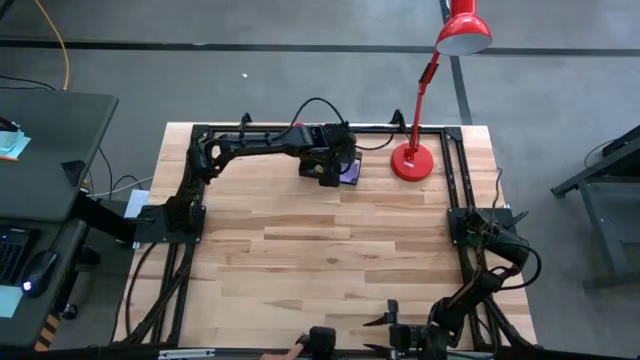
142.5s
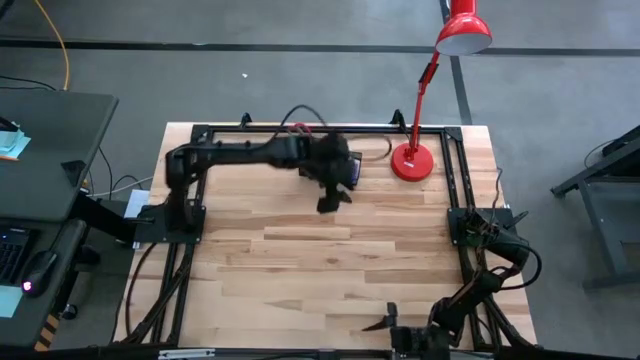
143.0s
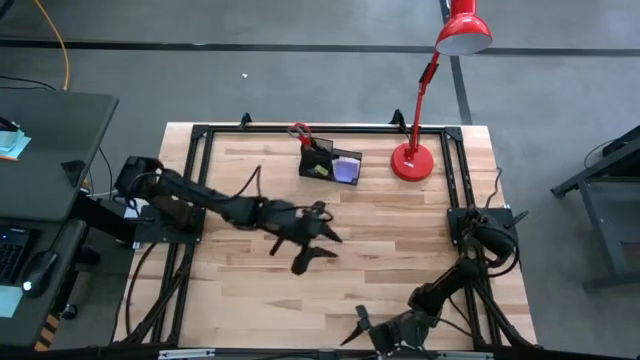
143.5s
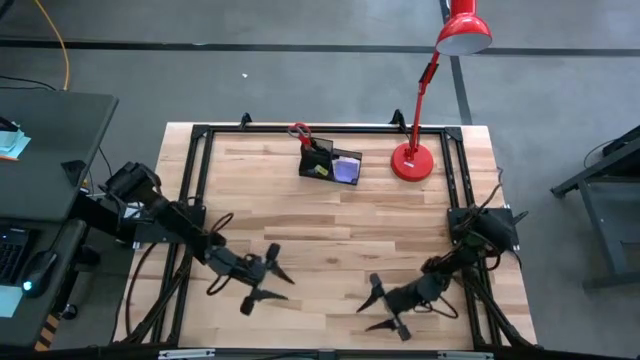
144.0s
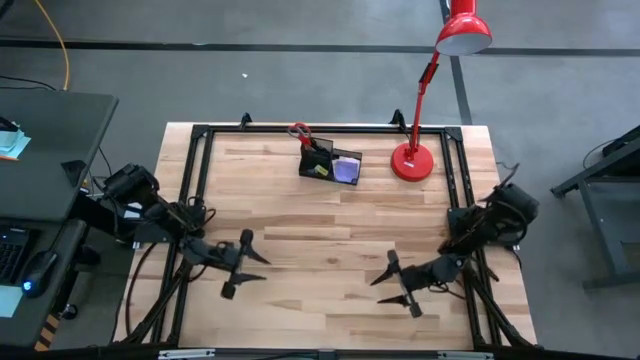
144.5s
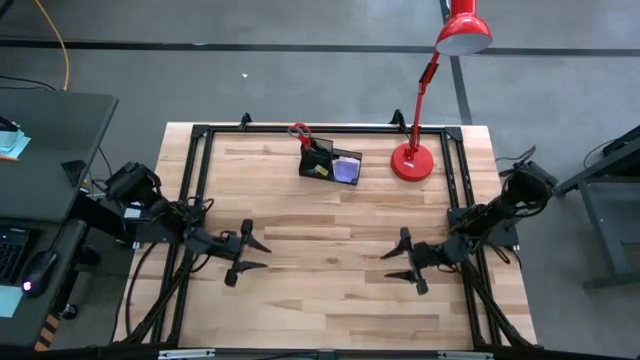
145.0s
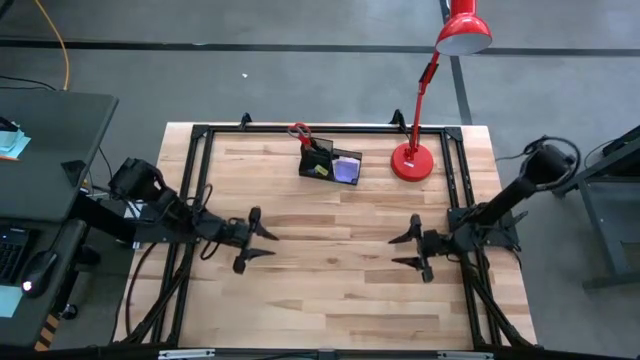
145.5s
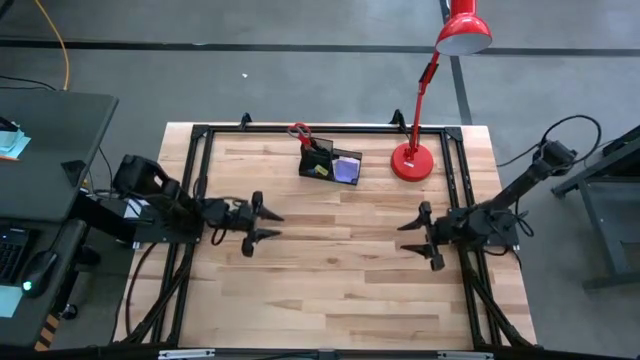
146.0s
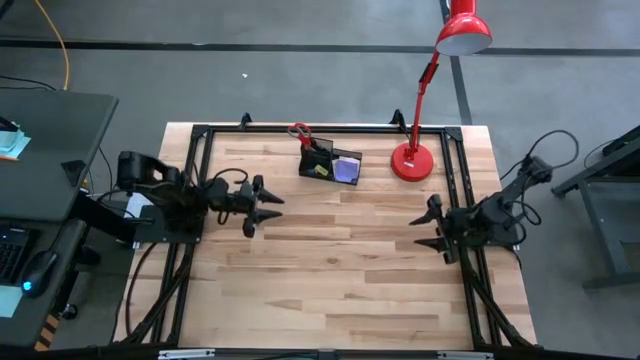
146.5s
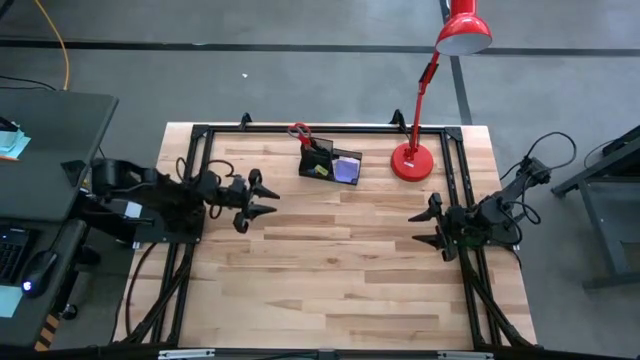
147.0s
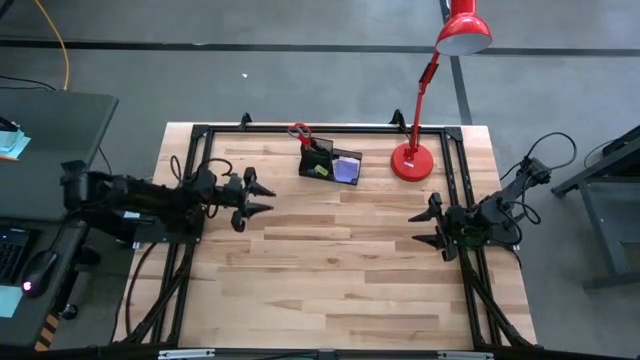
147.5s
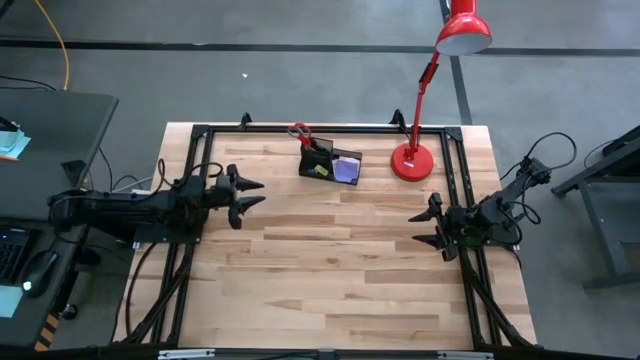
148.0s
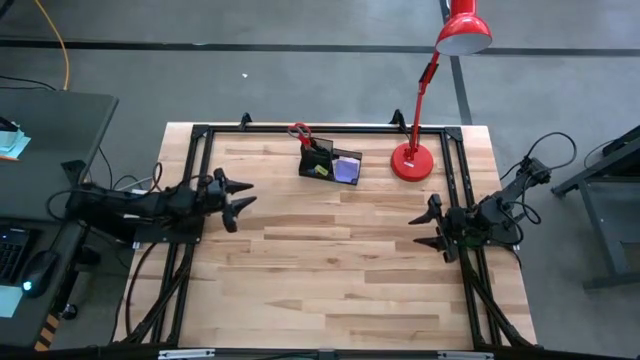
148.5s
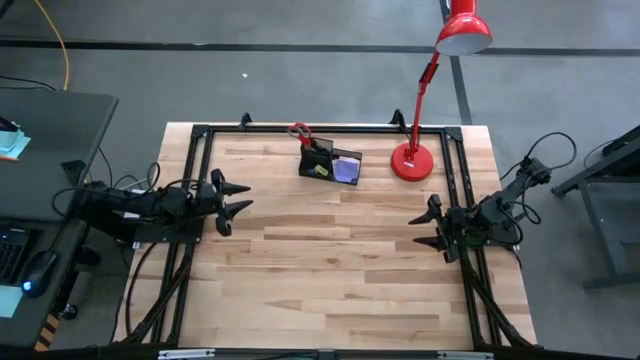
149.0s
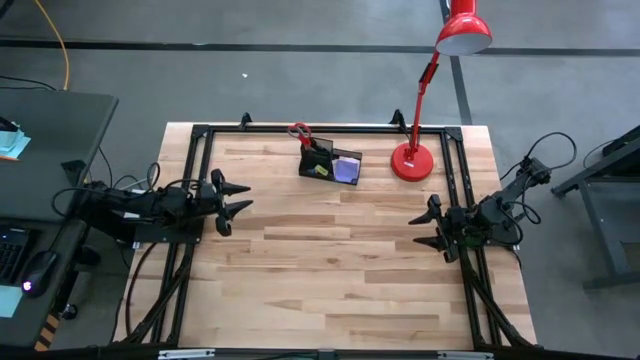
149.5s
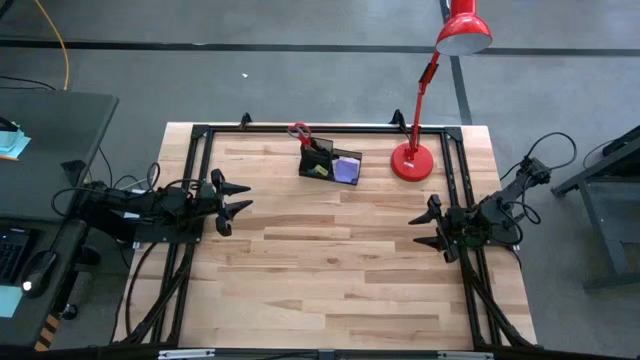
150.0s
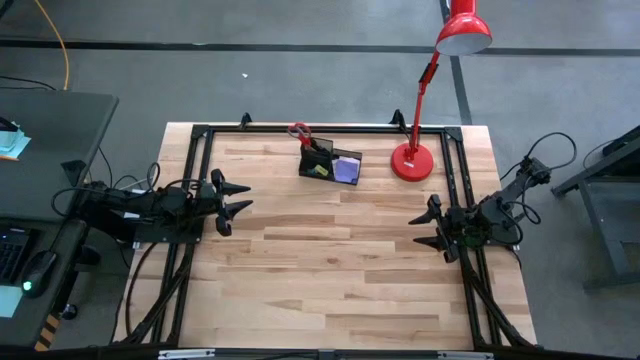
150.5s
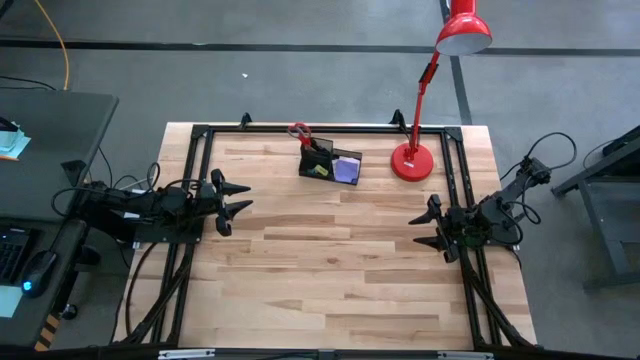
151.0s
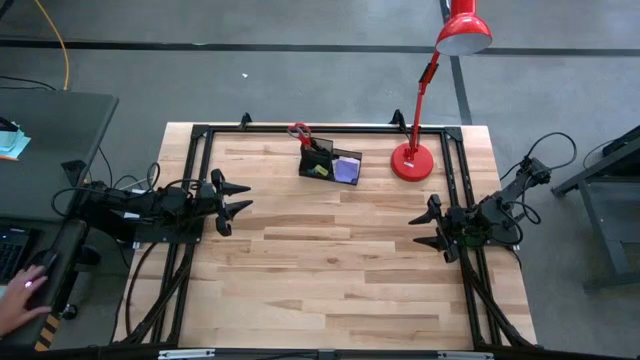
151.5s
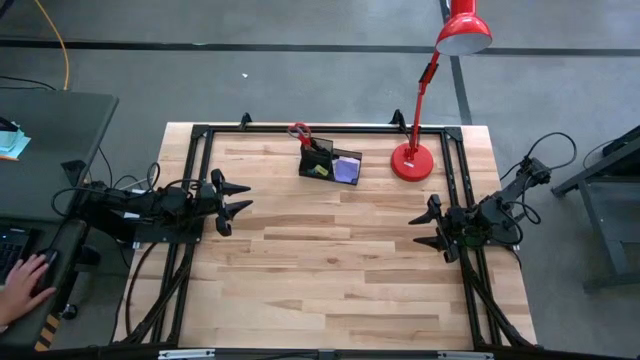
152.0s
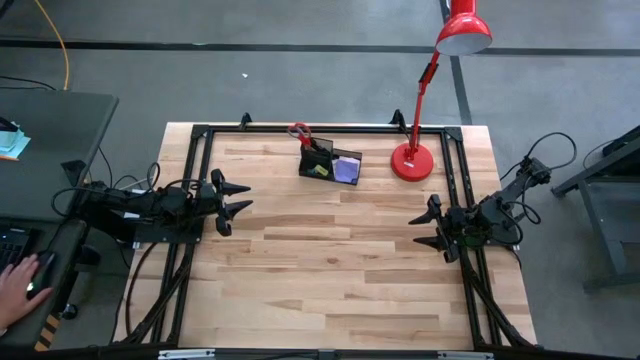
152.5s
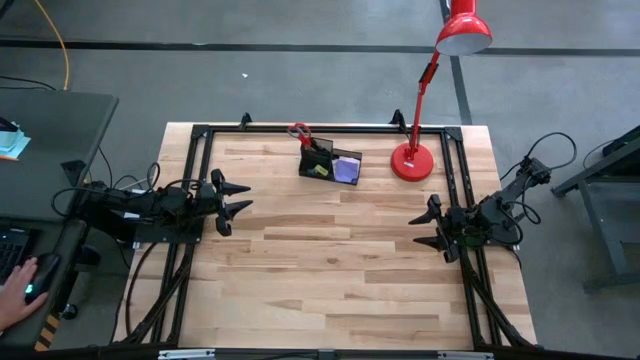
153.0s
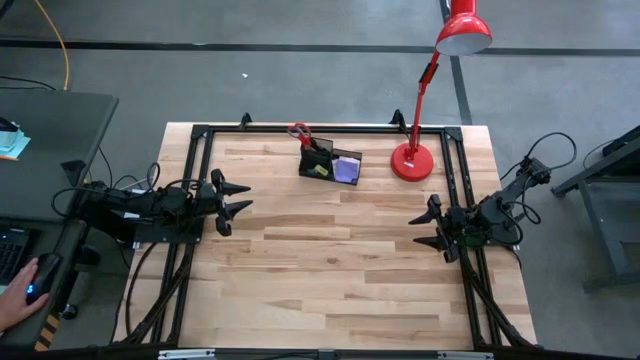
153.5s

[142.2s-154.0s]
Task: Pick and place office supplies into organizer
Return to Home Position

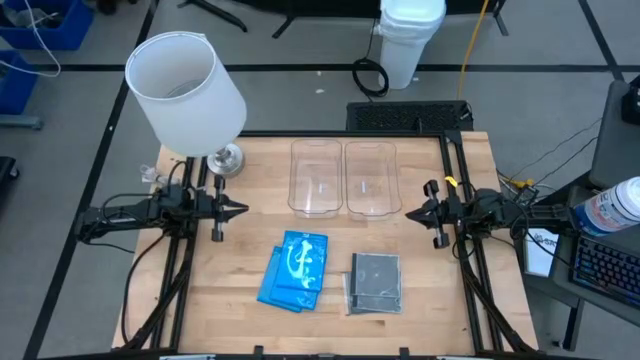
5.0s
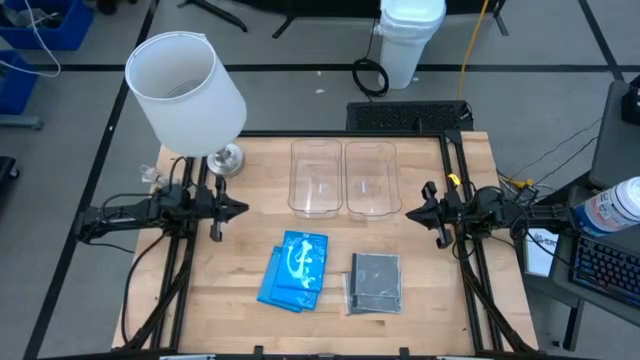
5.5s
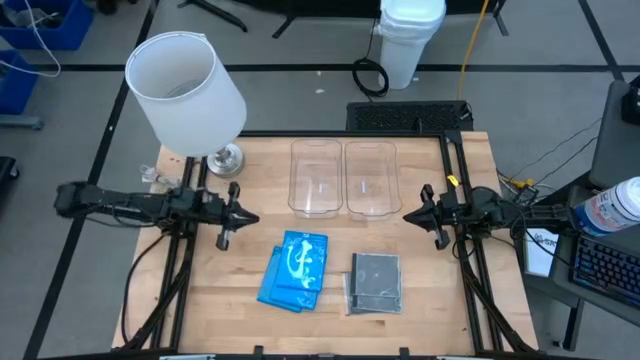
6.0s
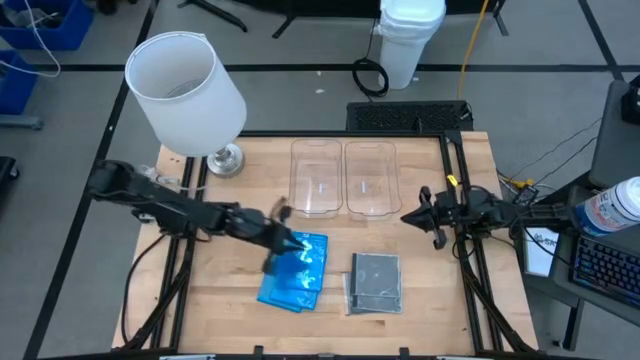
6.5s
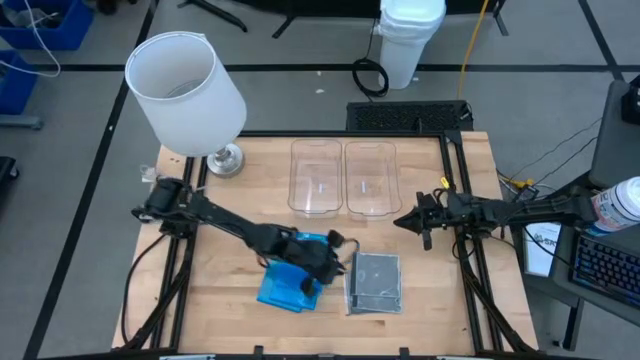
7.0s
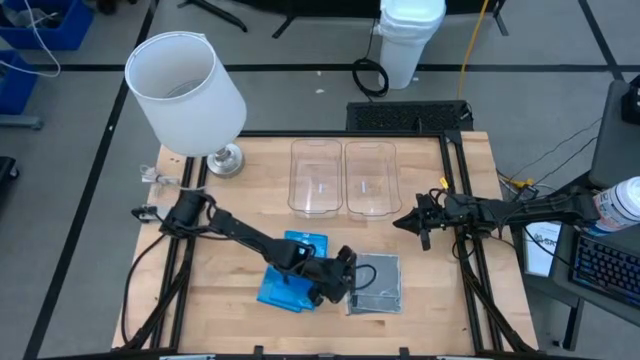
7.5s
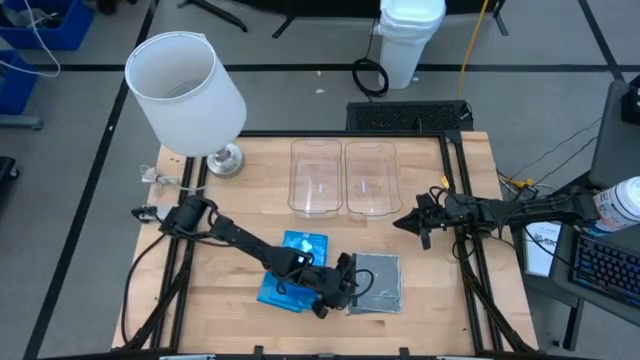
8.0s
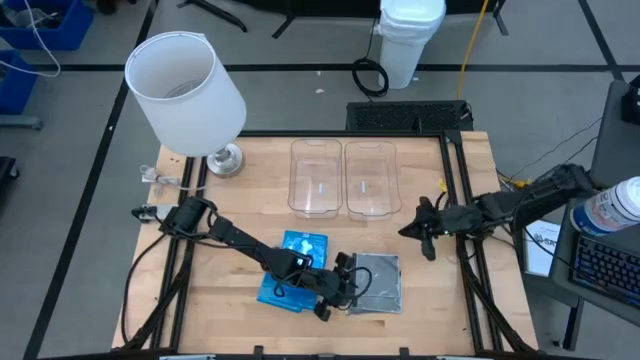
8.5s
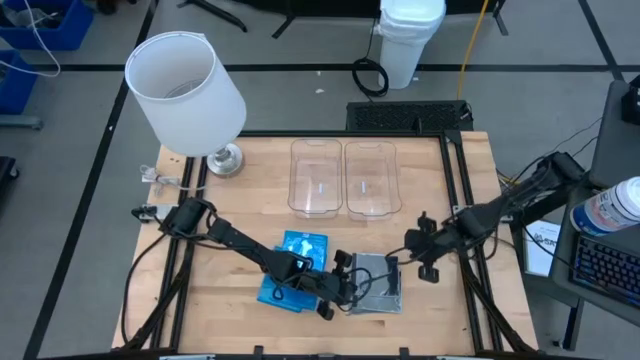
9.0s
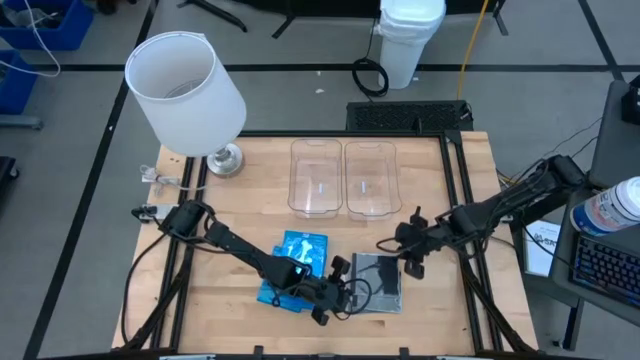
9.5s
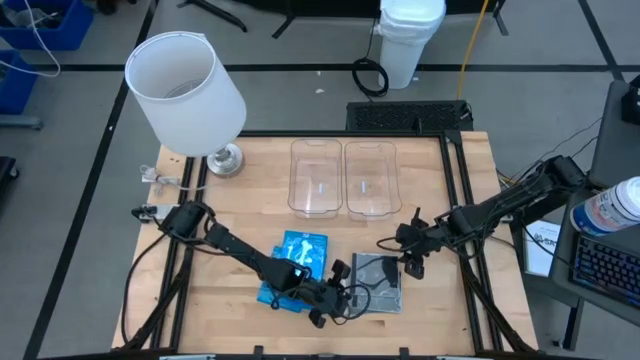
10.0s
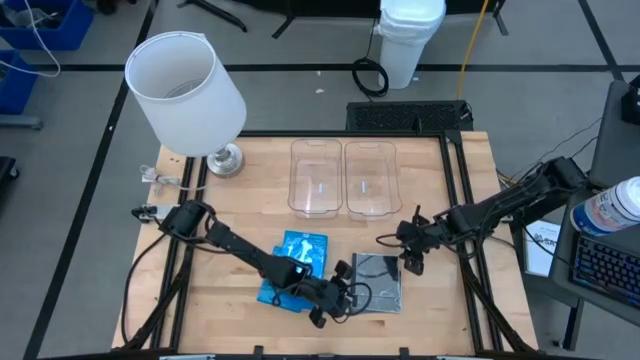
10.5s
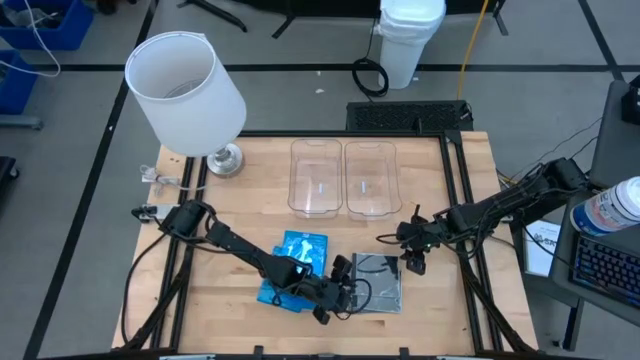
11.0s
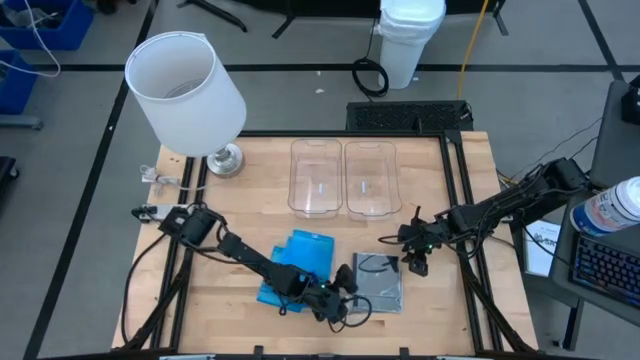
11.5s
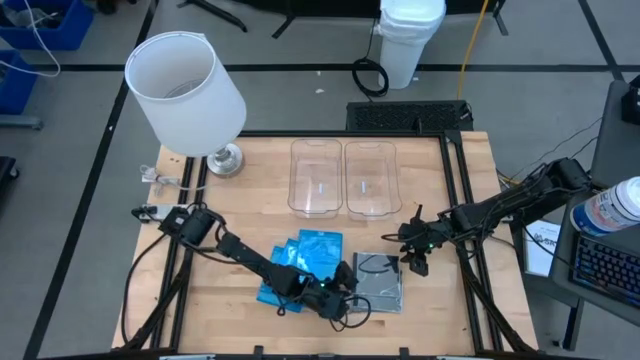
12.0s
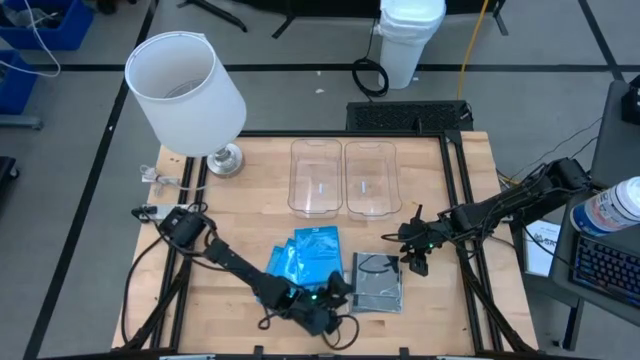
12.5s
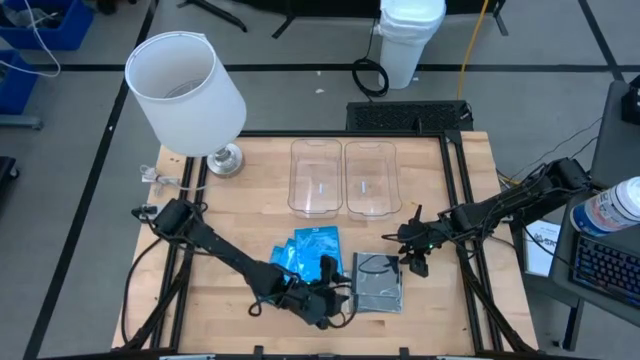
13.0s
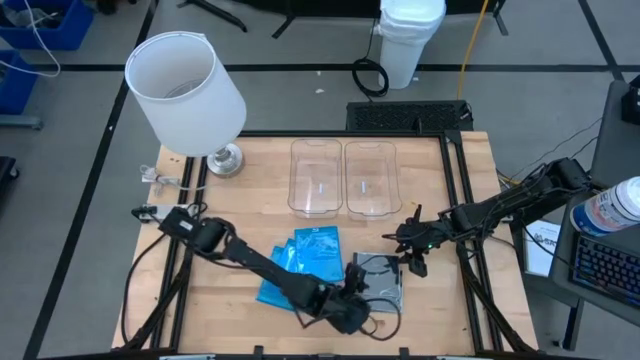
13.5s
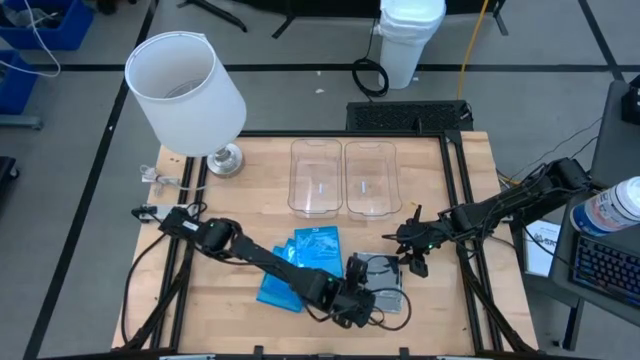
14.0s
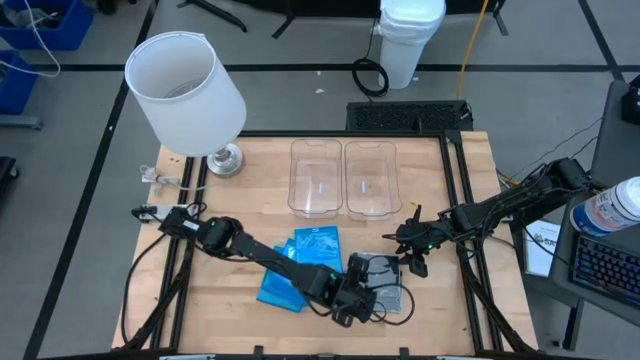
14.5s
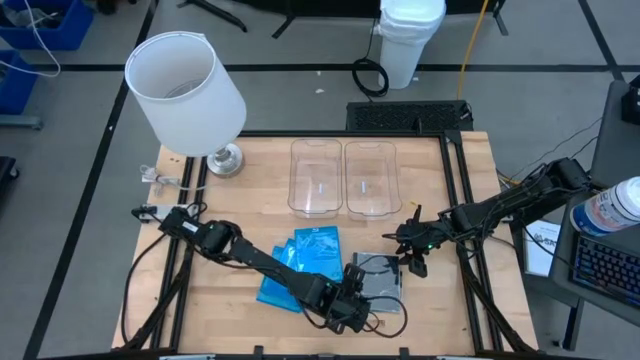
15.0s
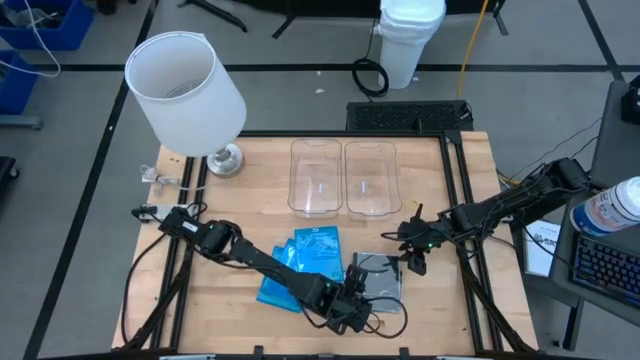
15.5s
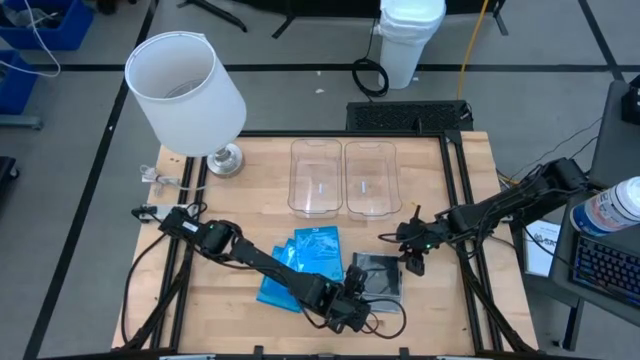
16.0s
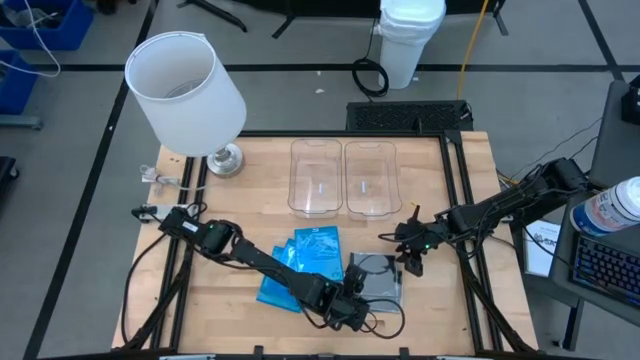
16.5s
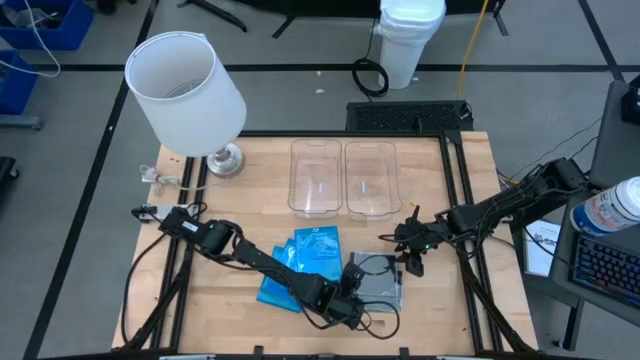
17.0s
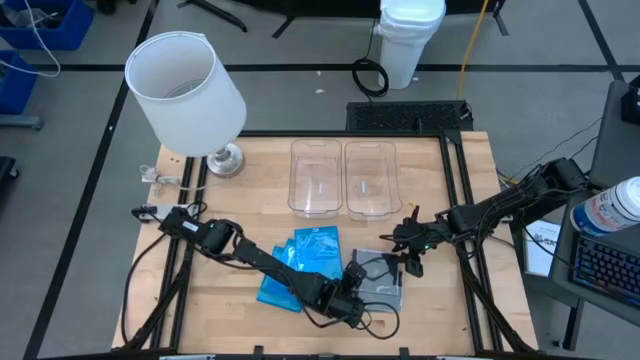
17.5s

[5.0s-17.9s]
Task: Pick & place jewel cases by type
Put the top black CD case into the right transparent bin
